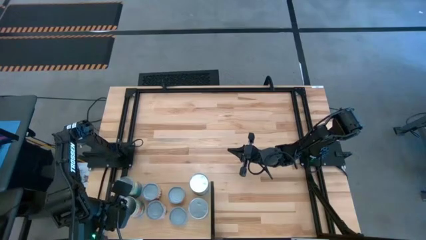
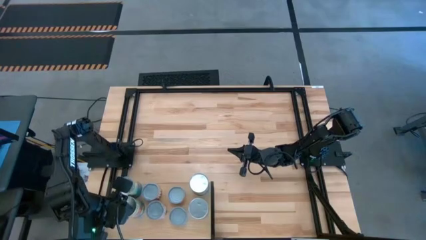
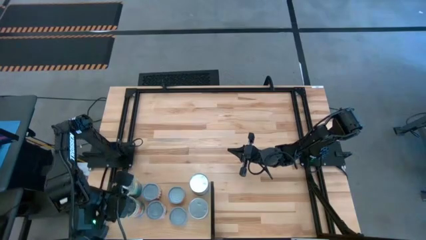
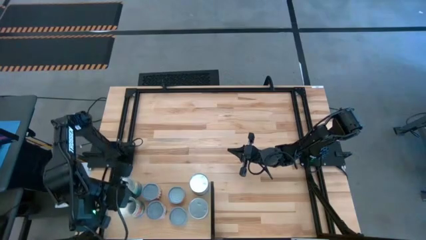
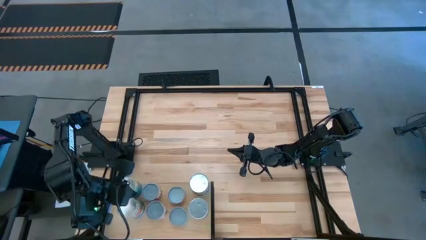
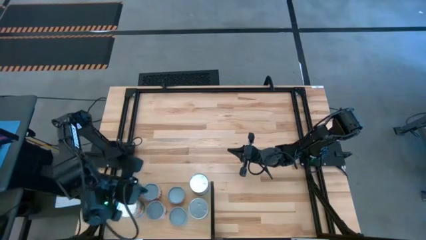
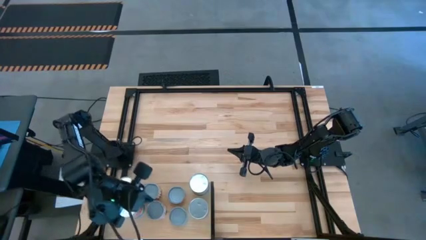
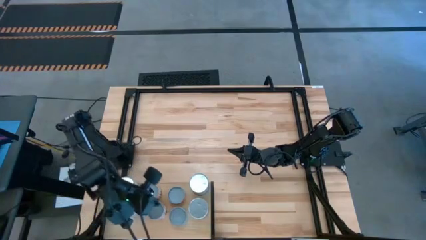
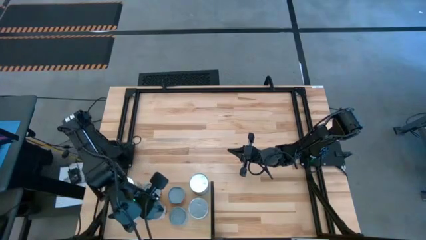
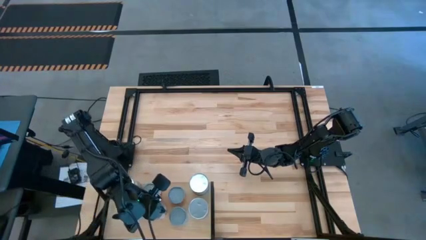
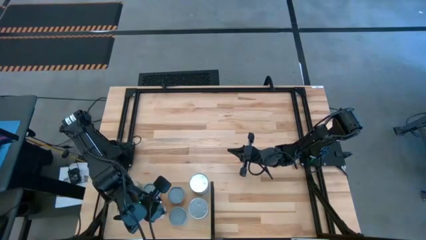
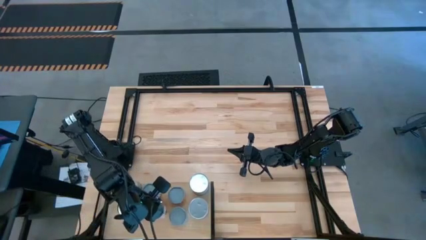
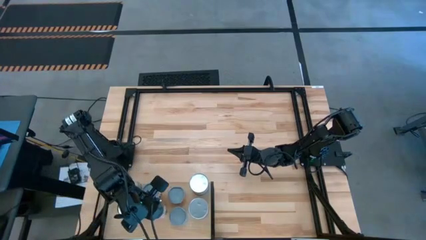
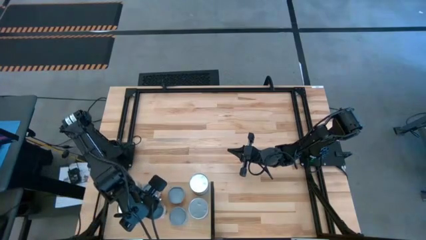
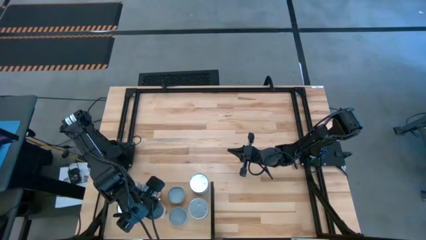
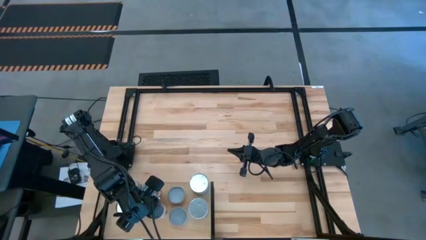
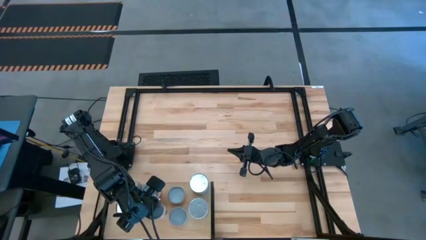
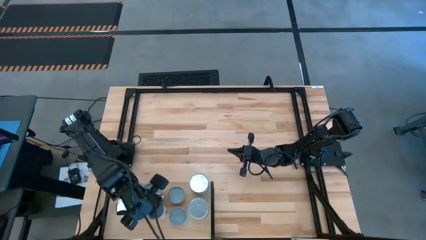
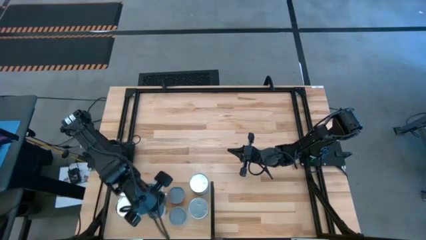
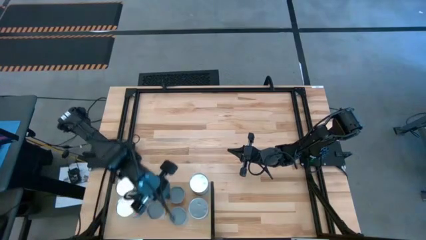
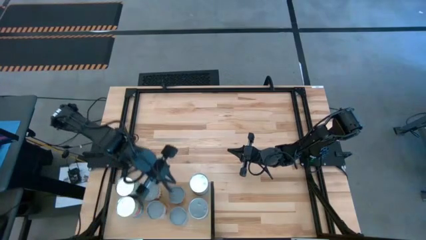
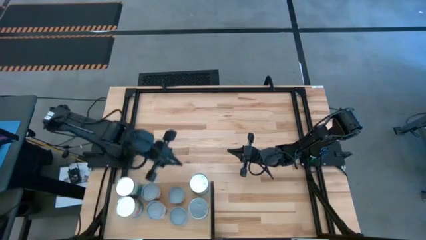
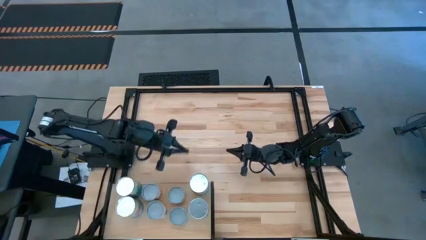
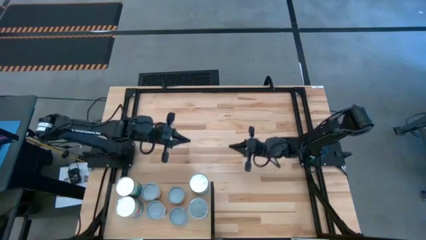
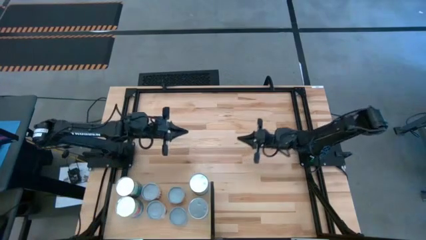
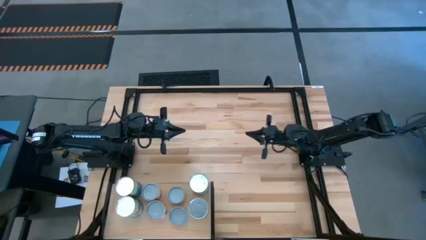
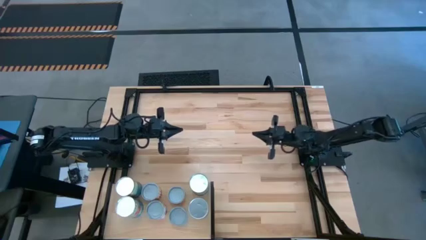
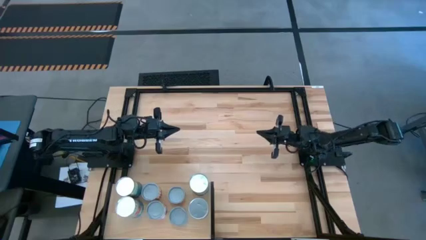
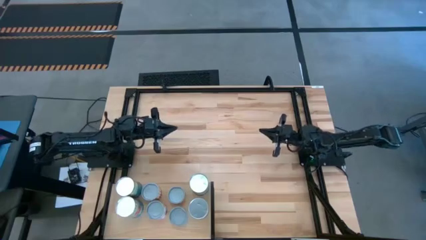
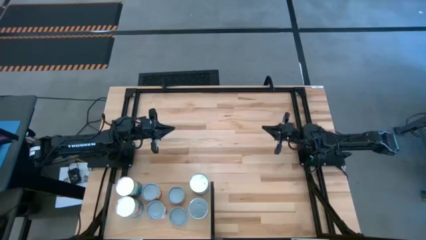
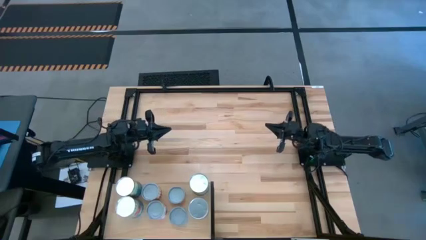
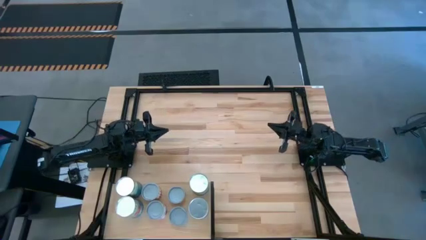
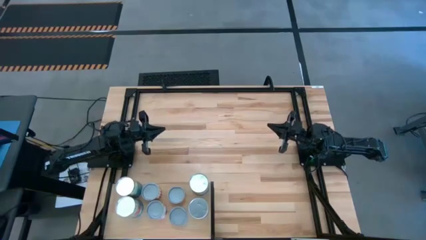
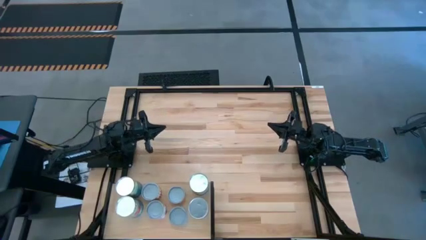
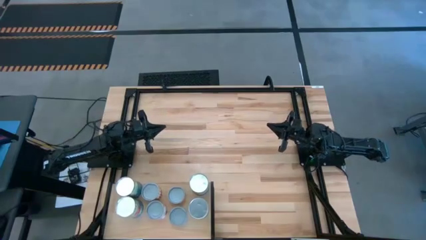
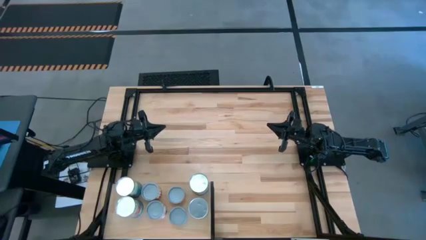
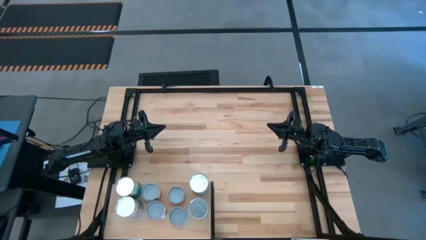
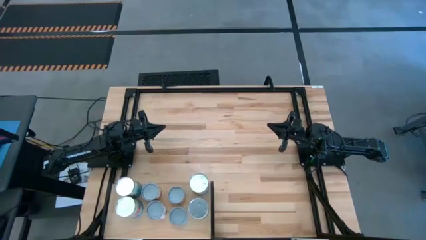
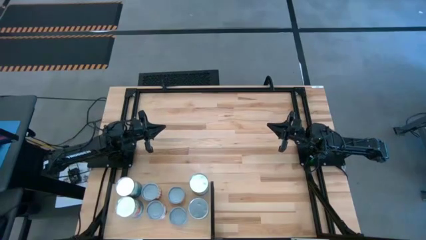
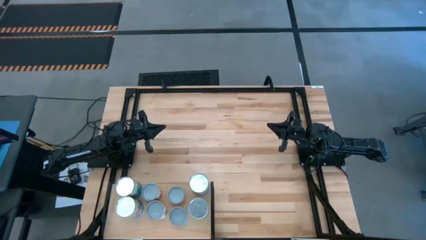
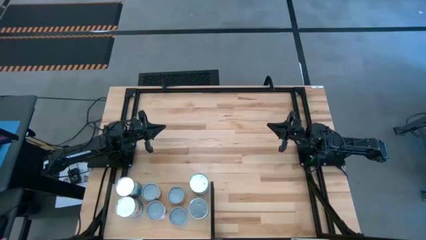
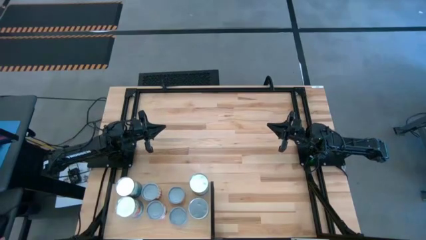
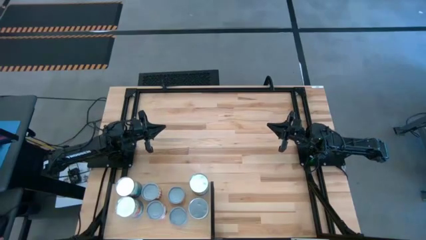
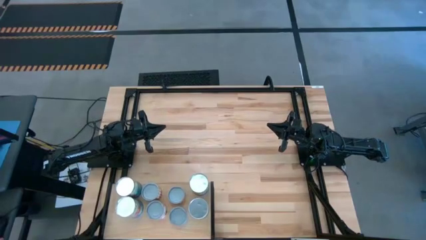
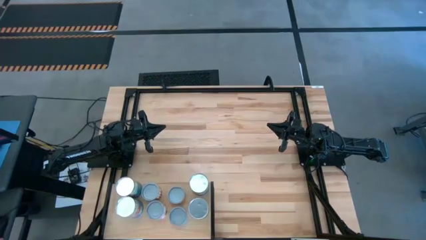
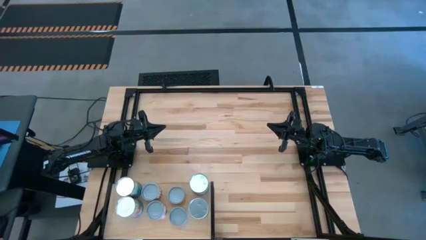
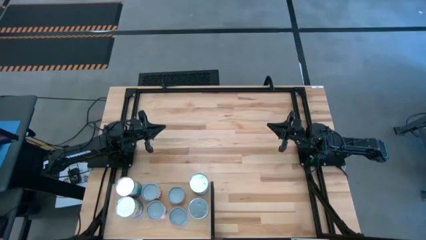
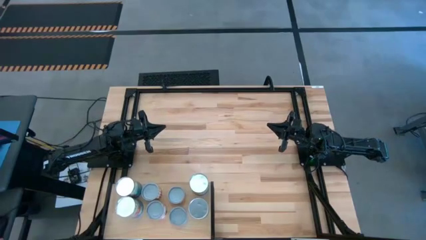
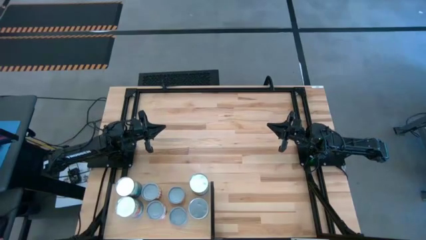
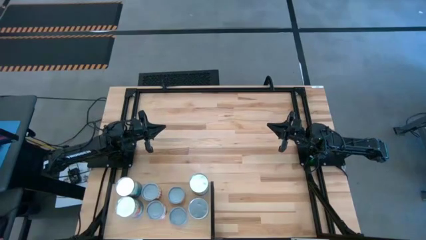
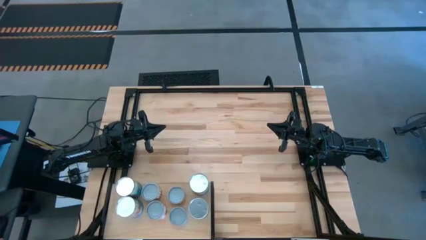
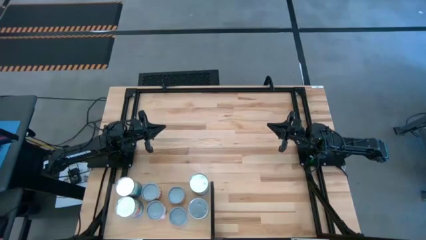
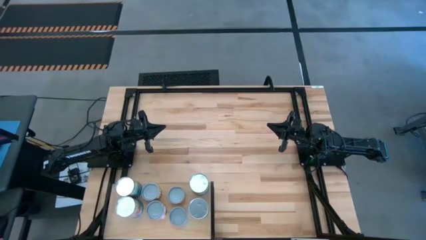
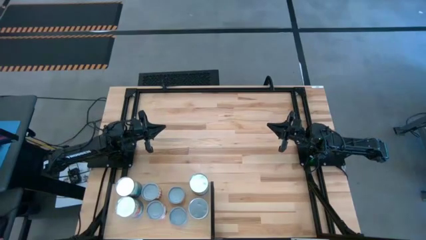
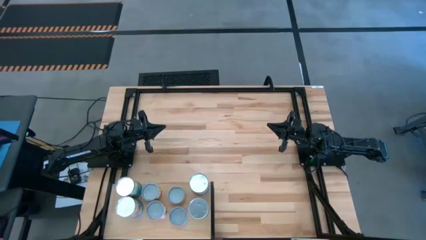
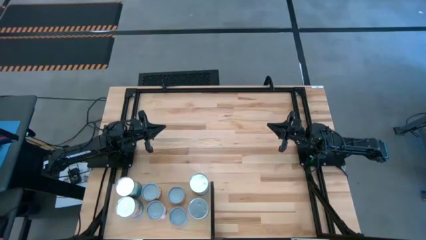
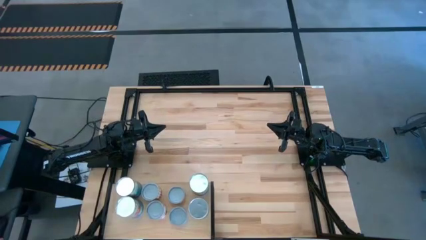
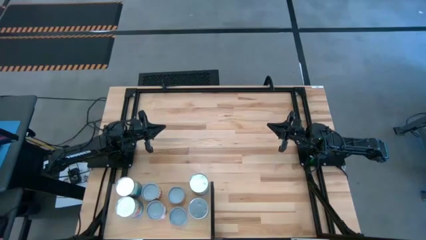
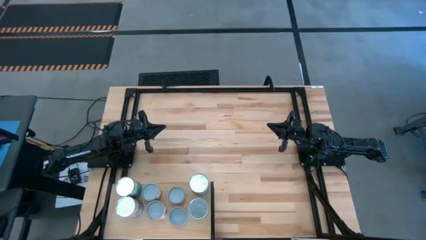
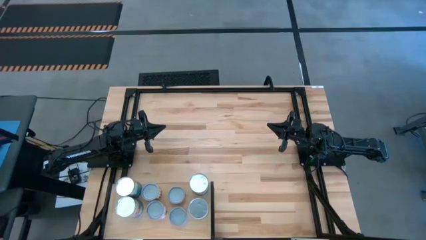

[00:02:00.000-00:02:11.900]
Task: Pick and place cans onto a shelf
Return to Home Position

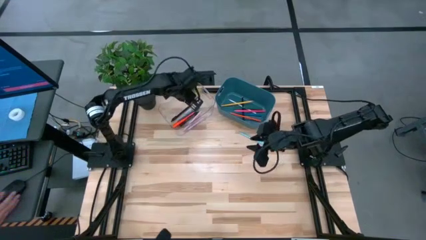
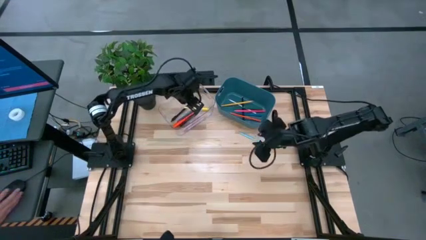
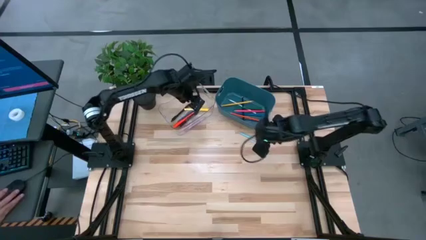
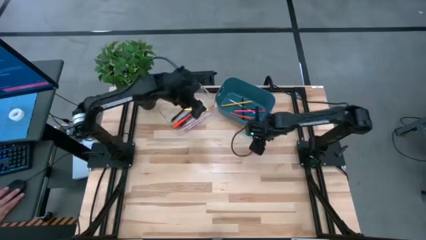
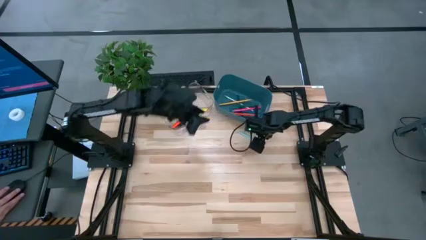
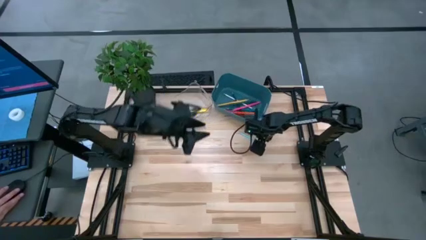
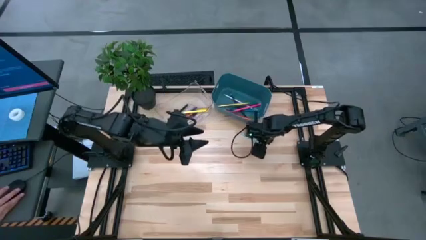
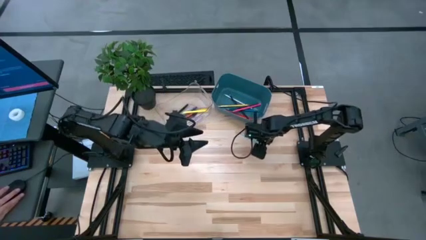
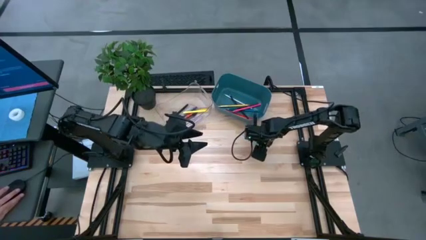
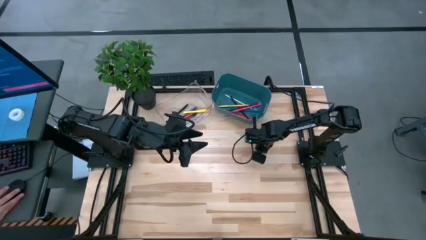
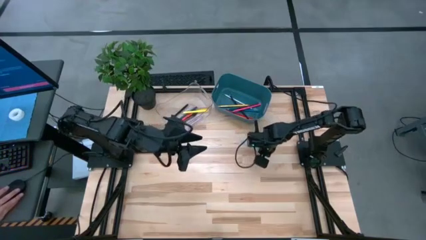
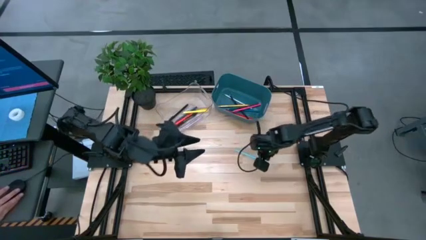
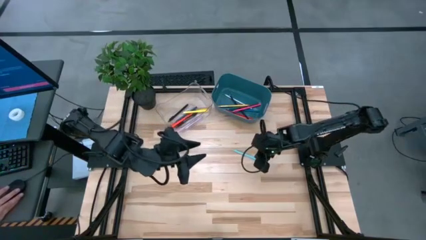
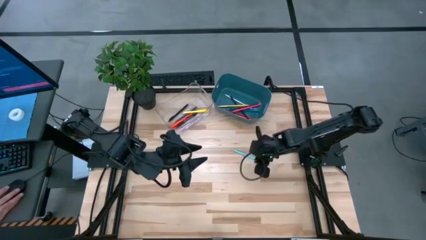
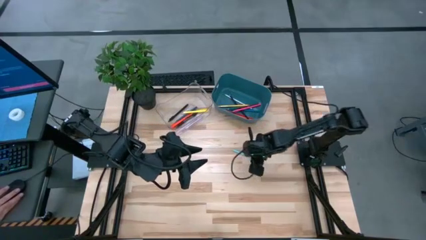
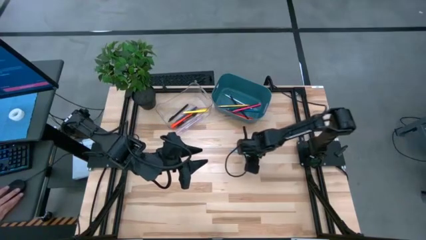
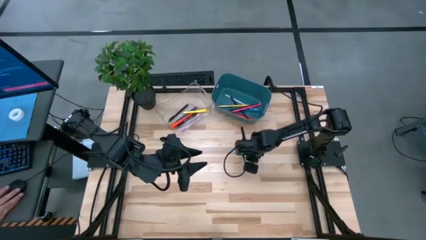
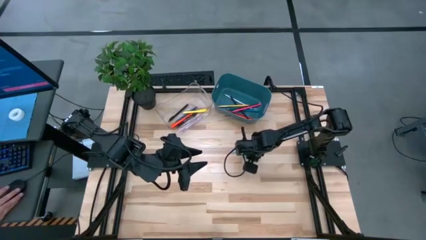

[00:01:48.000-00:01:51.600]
Task: Sort pens & pencils
Put the blue pen into the transparent bin
